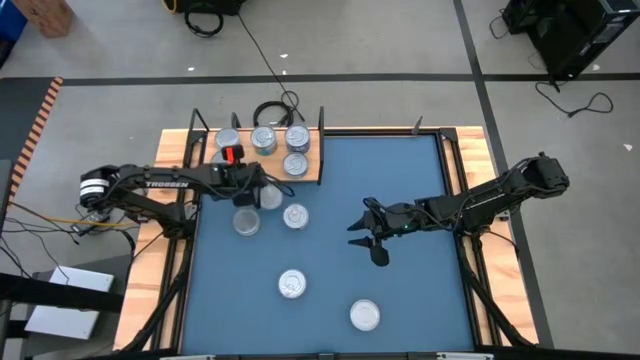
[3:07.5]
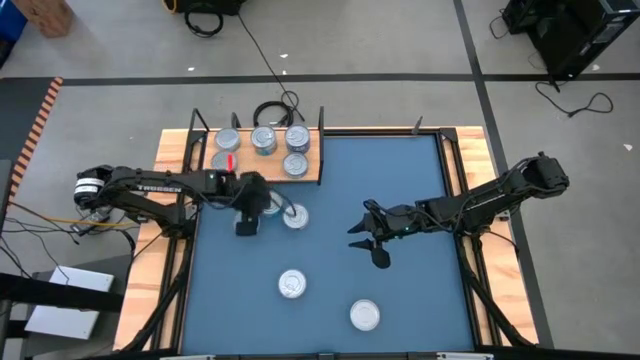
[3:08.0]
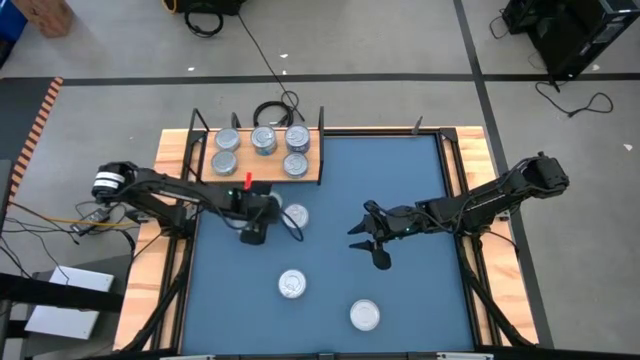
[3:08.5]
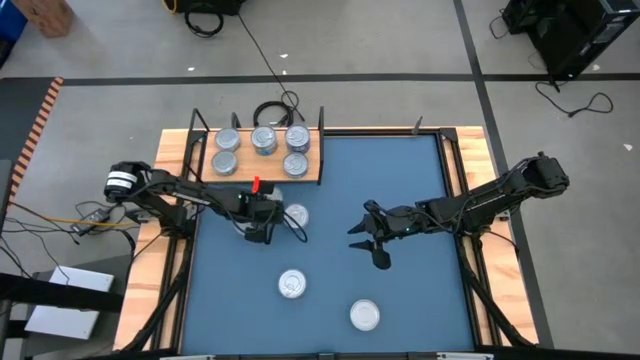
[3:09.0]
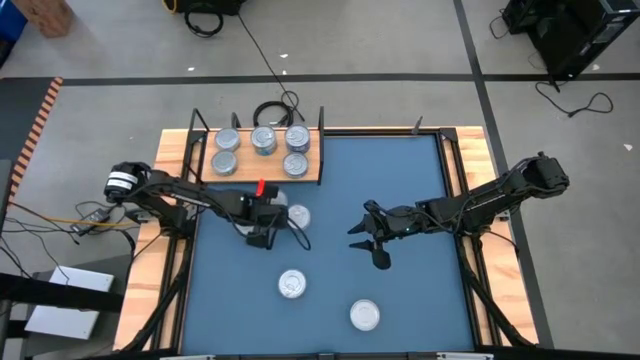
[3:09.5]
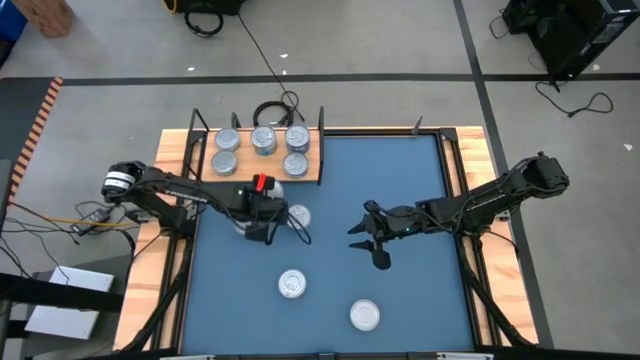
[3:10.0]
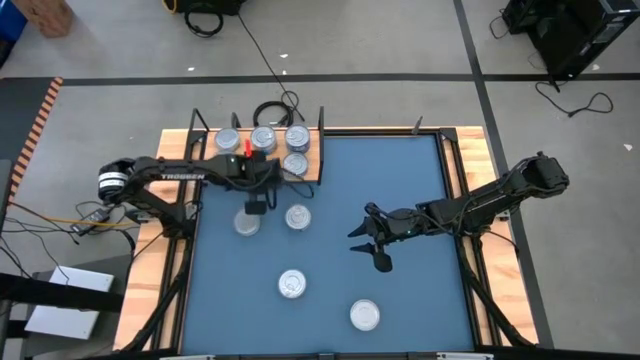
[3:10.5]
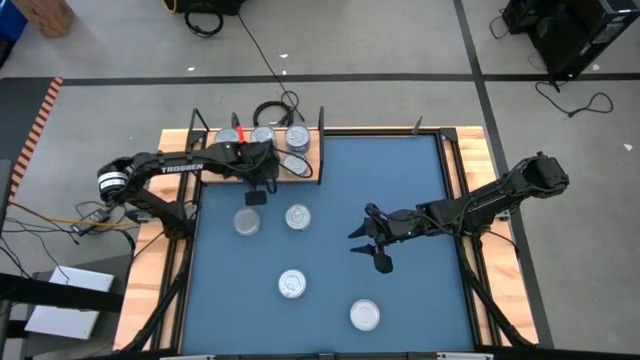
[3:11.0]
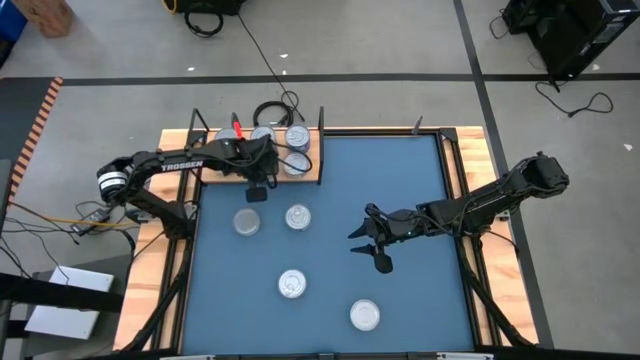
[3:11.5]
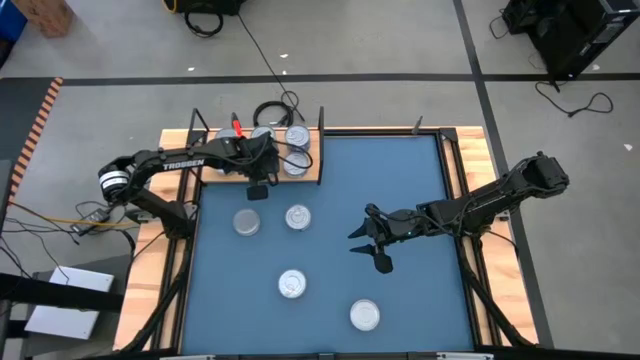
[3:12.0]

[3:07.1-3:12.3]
Task: Stack canned seafood by type on shelf
Put the yellow blue tuna can on the shelf

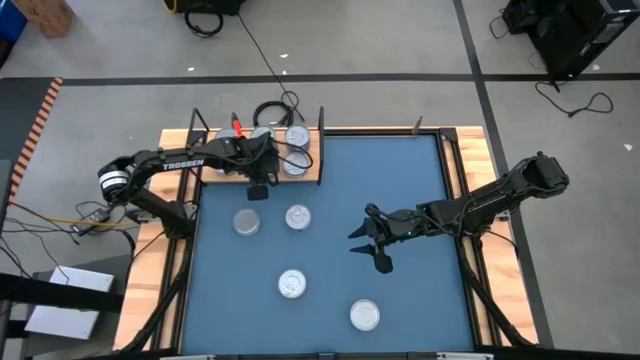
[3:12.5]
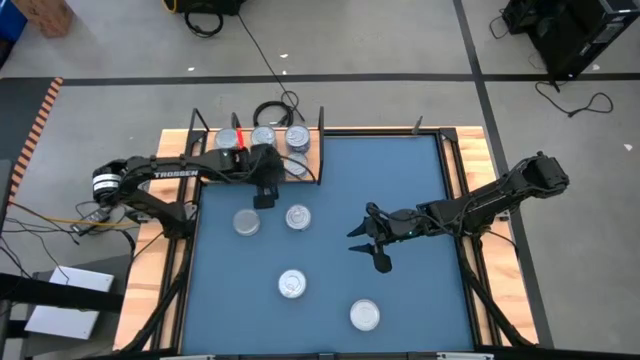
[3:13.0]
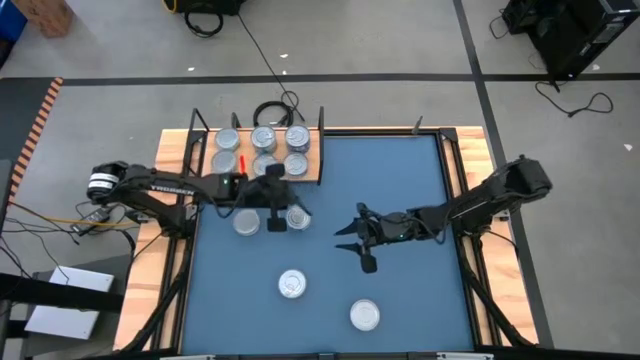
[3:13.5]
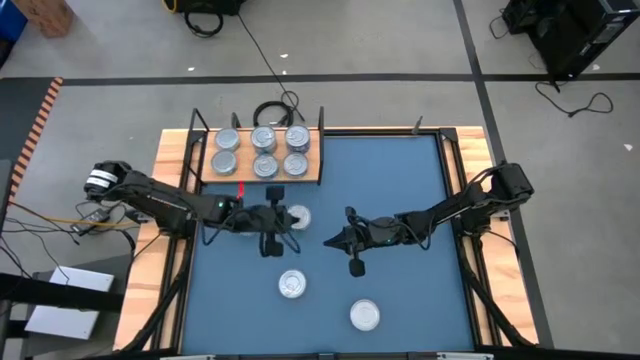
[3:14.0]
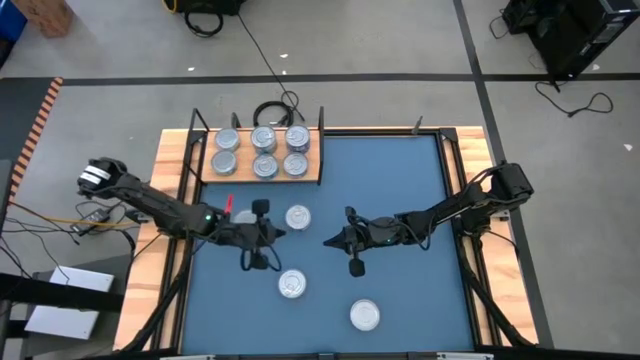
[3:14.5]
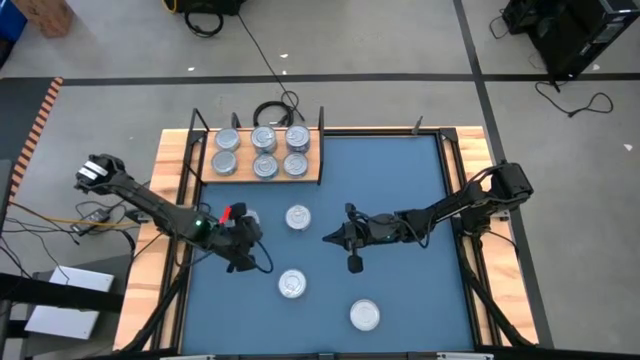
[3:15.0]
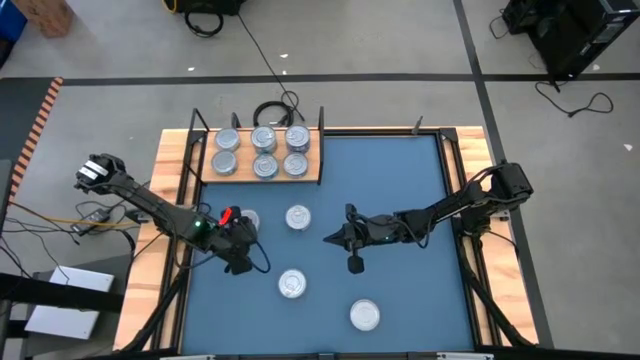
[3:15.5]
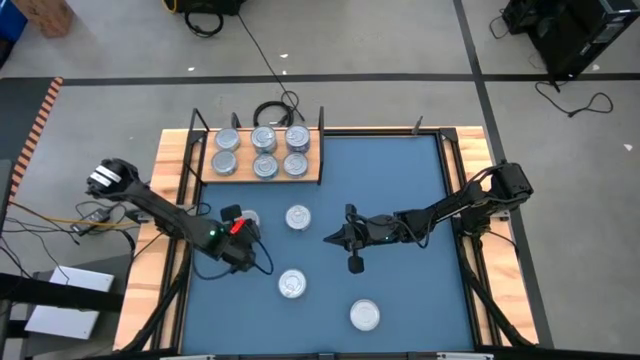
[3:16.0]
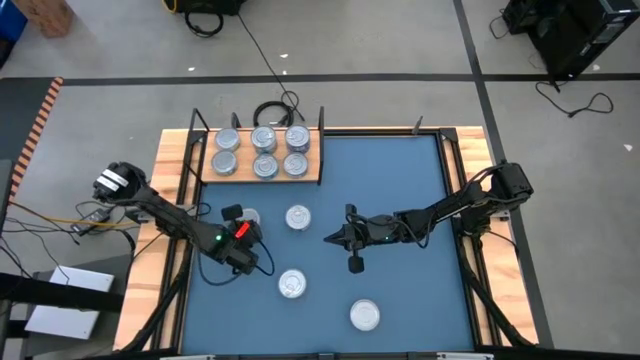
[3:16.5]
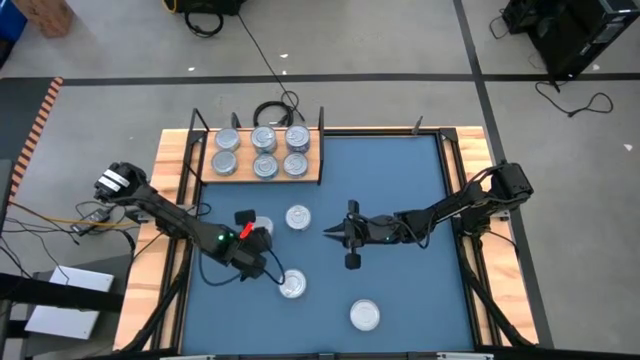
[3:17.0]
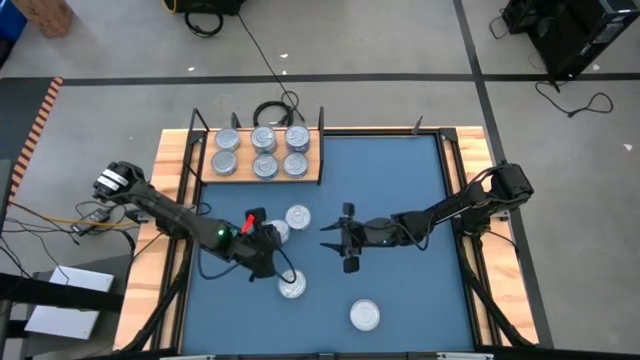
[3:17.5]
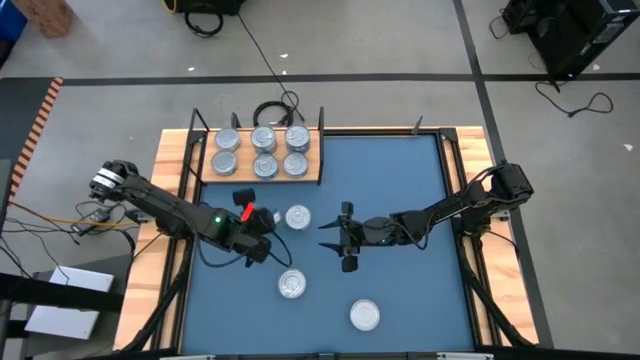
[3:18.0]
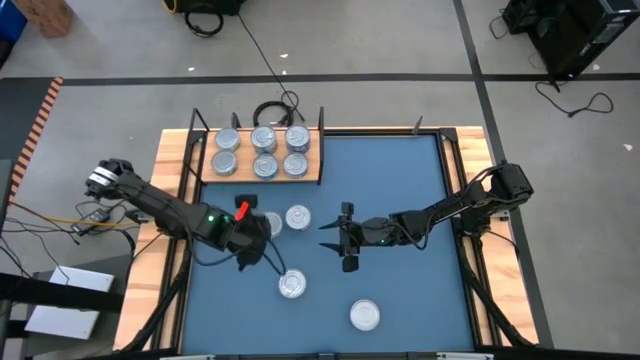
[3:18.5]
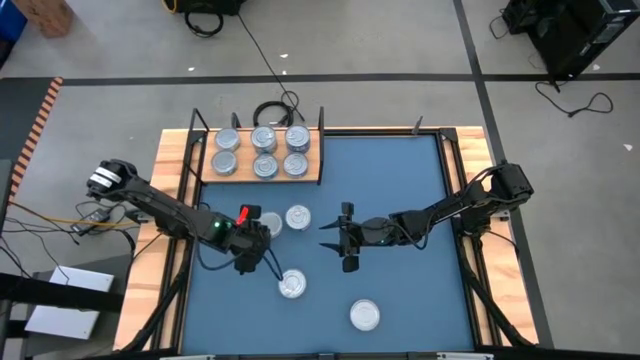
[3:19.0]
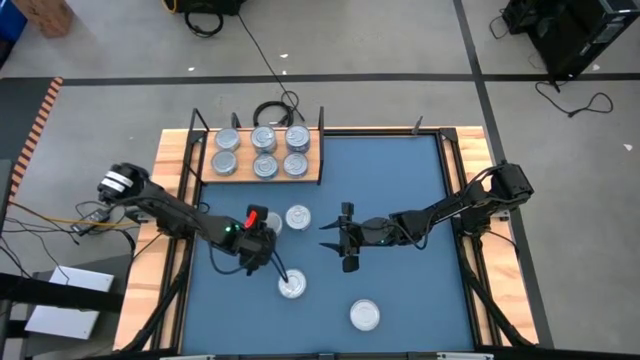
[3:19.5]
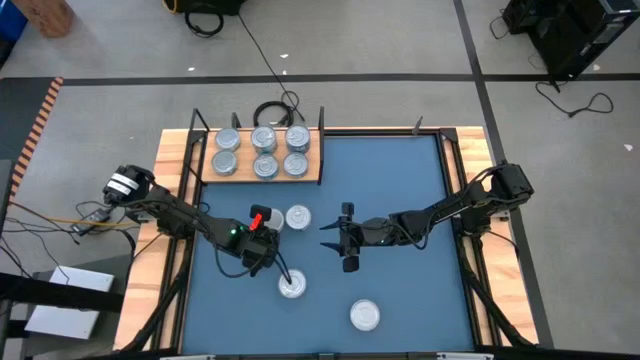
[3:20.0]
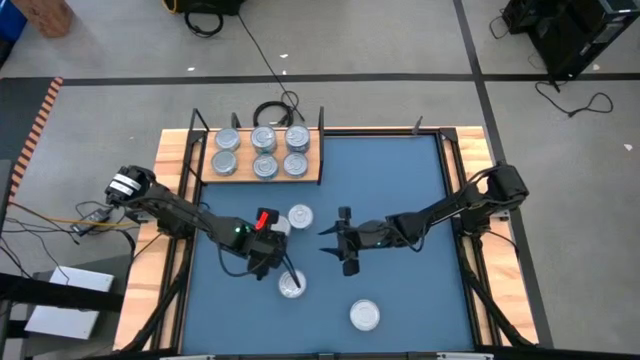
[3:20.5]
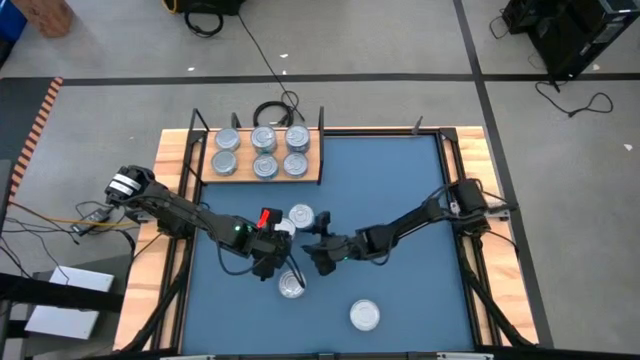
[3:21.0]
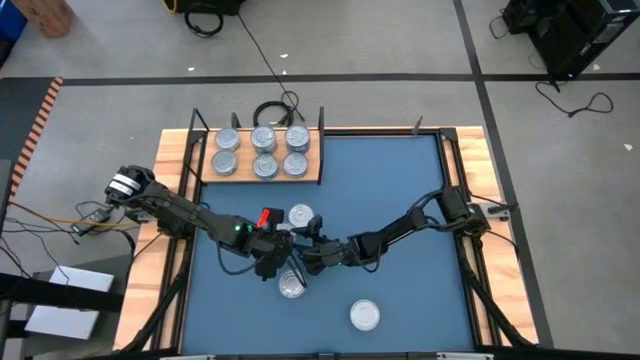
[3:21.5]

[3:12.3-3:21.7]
Stack the green tuna can on top of the other green tuna can on the shelf

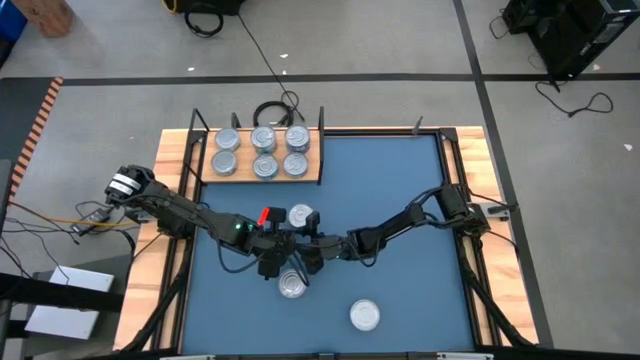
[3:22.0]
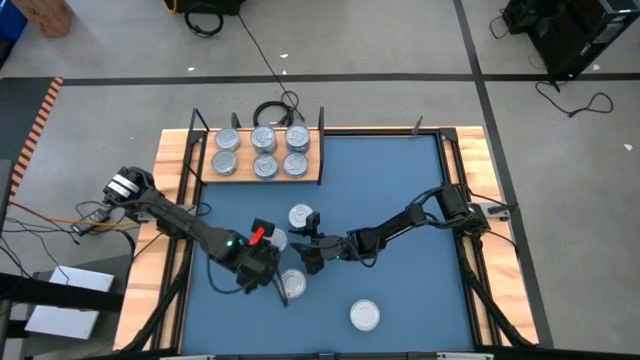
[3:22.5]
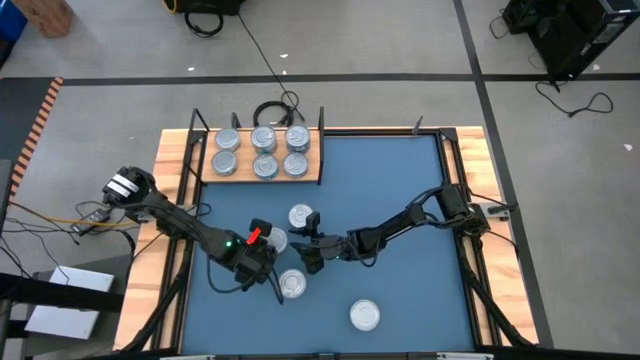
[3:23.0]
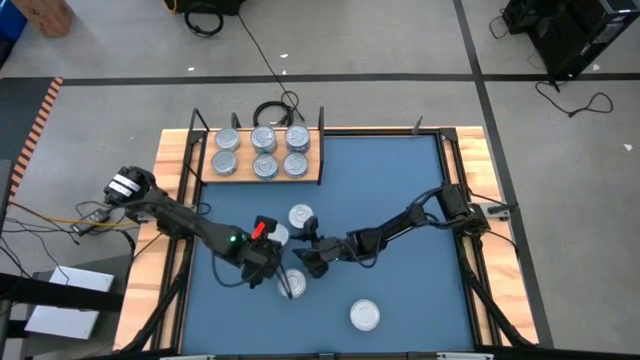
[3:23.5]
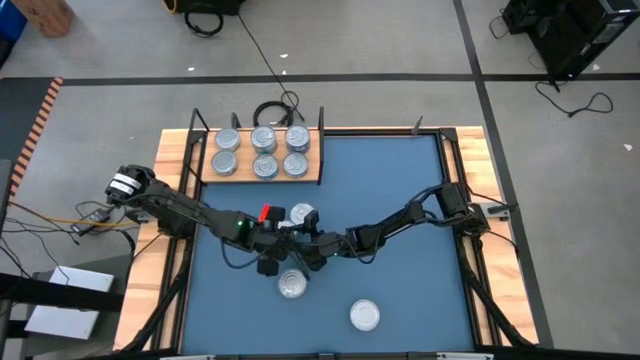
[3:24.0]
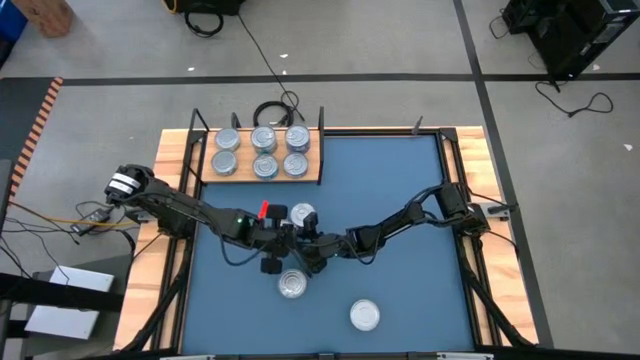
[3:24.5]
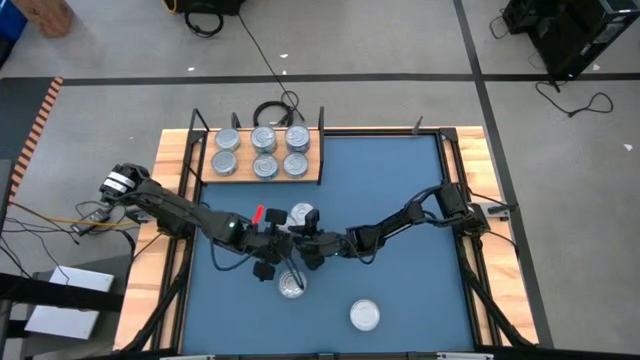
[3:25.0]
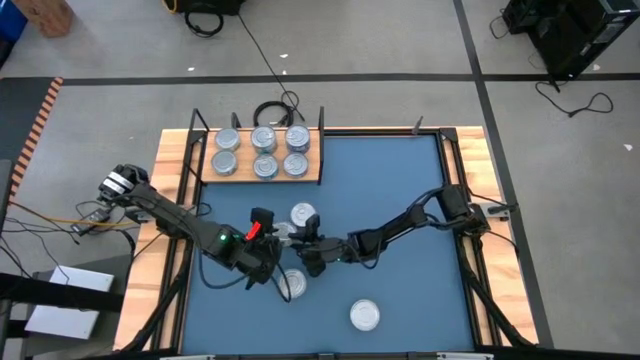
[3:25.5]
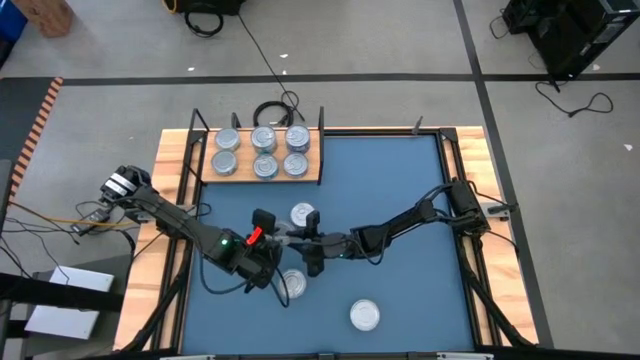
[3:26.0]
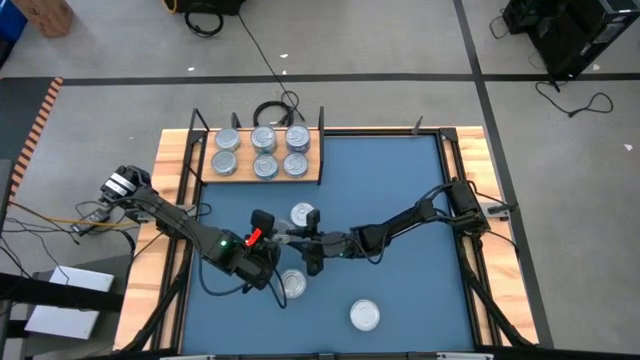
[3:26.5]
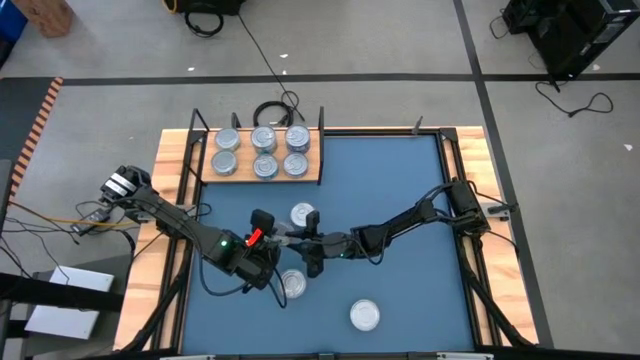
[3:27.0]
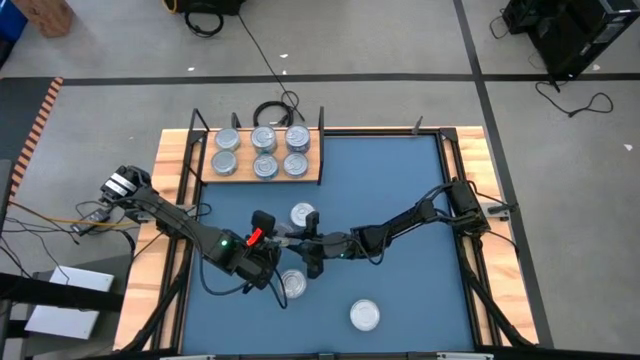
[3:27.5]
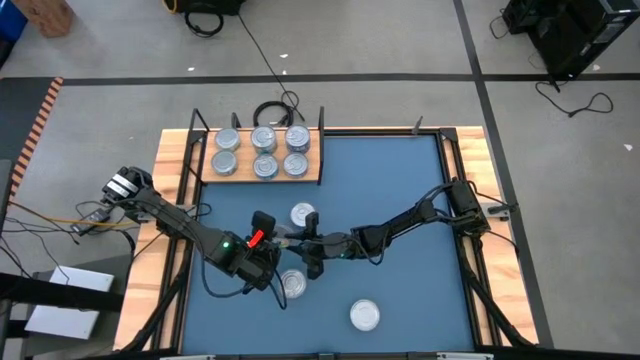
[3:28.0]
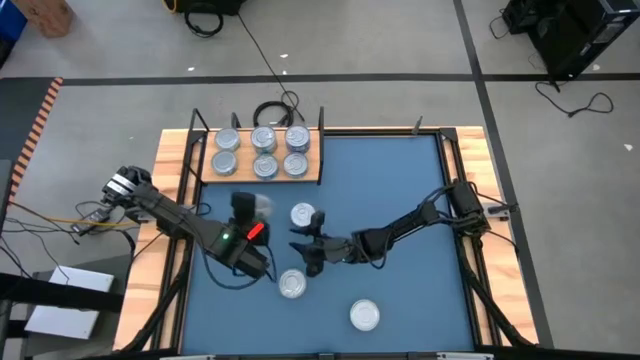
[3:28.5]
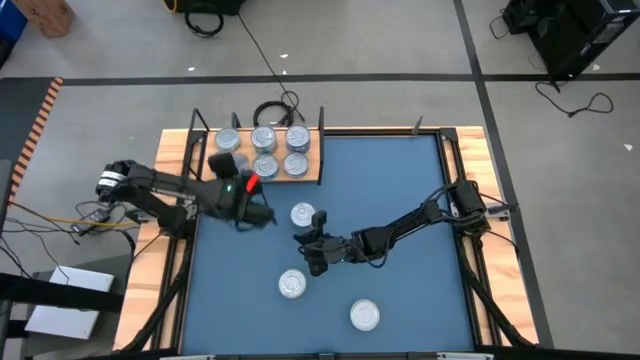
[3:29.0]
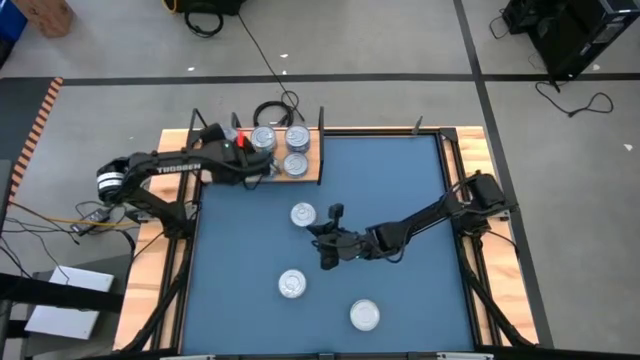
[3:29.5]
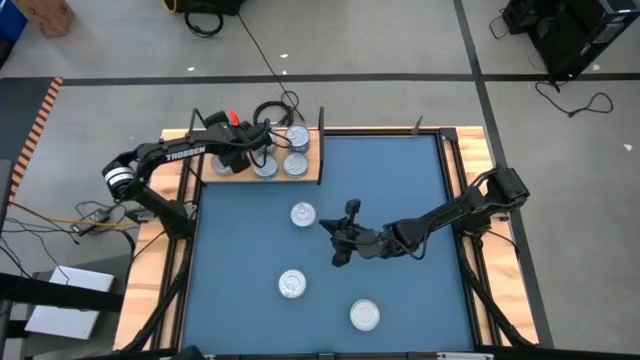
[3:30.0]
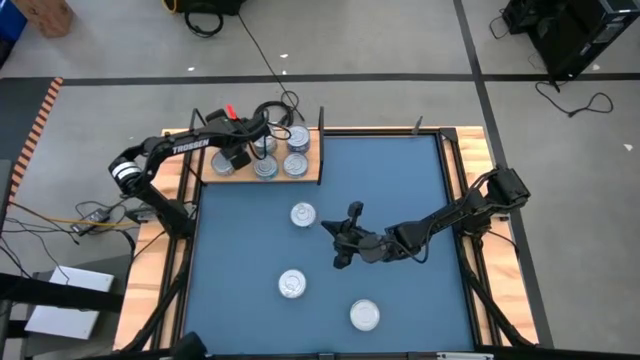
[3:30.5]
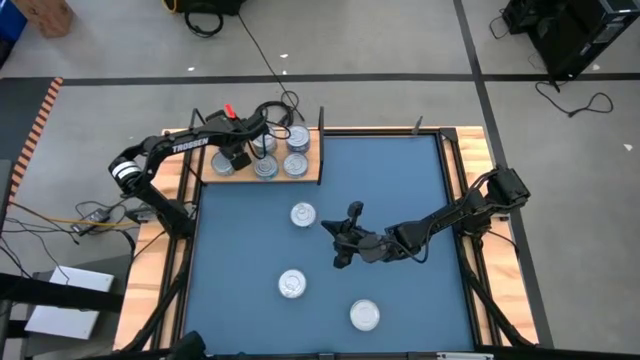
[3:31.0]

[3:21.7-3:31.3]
Stack the green tuna can on top of the other green tuna can on the shelf
